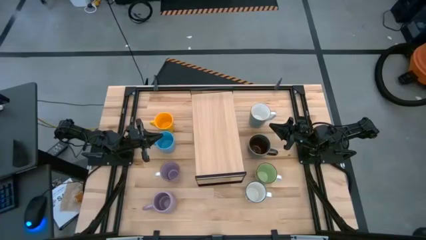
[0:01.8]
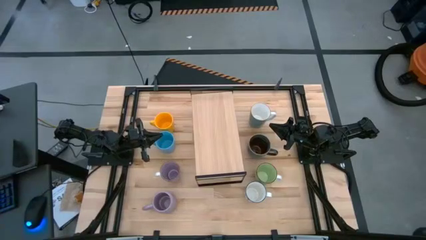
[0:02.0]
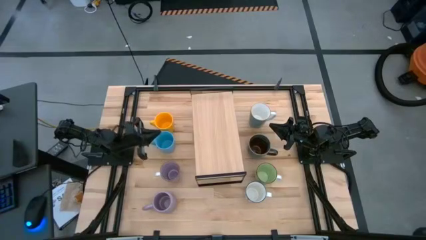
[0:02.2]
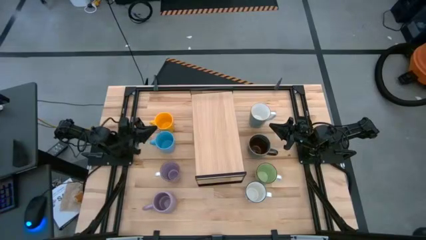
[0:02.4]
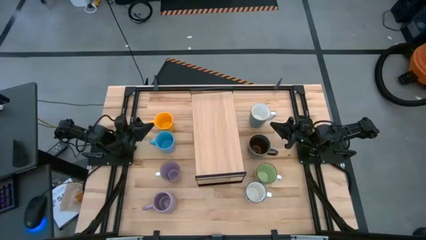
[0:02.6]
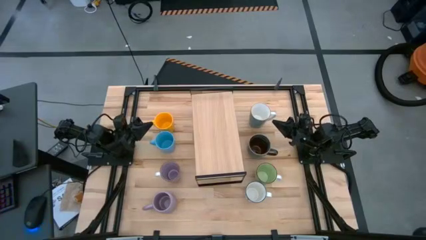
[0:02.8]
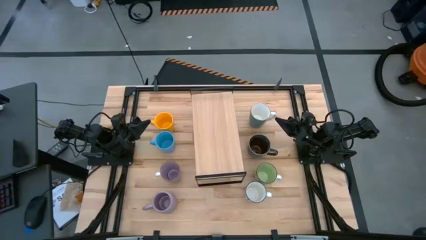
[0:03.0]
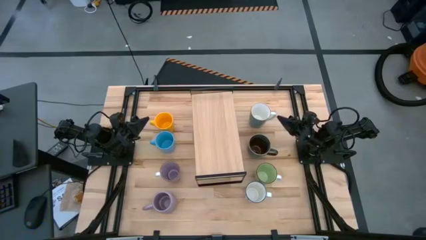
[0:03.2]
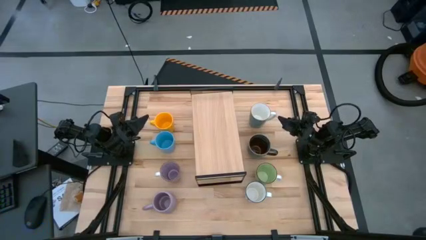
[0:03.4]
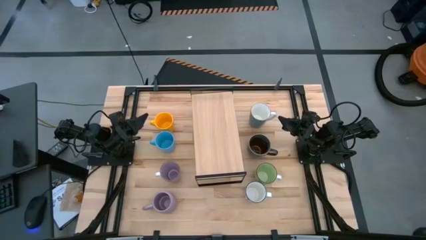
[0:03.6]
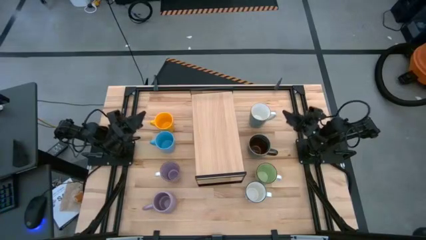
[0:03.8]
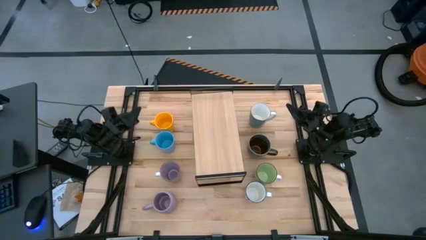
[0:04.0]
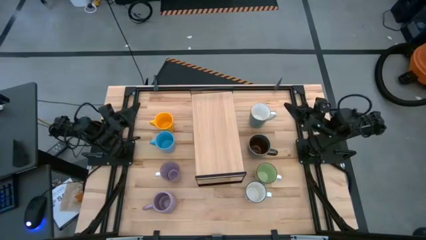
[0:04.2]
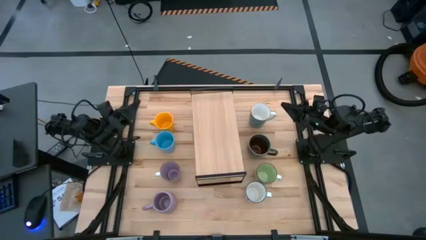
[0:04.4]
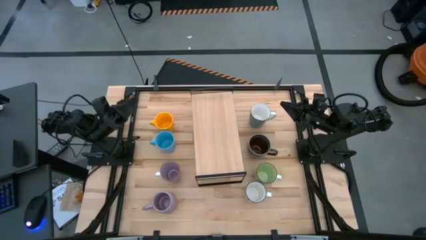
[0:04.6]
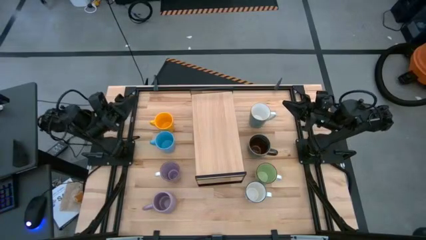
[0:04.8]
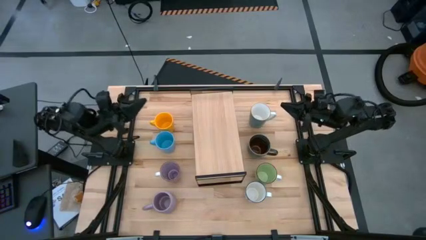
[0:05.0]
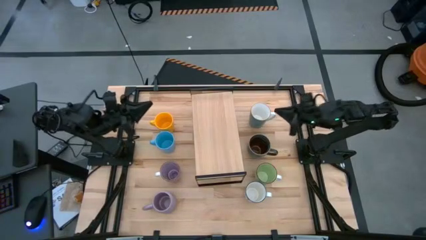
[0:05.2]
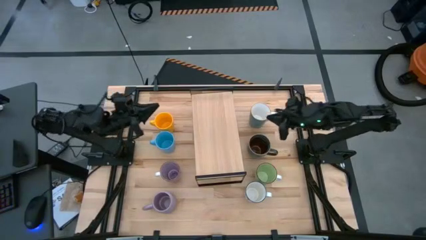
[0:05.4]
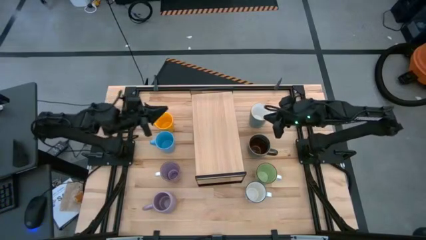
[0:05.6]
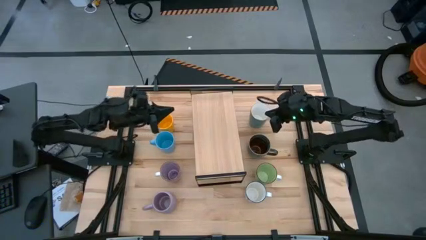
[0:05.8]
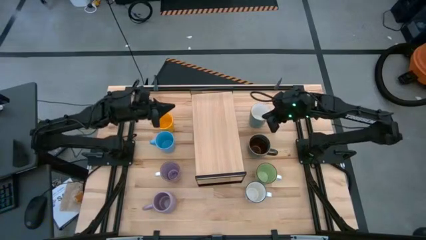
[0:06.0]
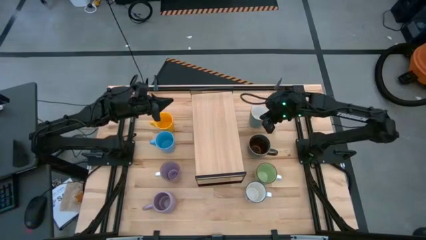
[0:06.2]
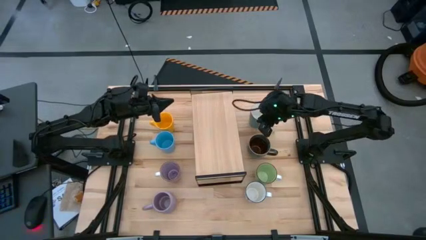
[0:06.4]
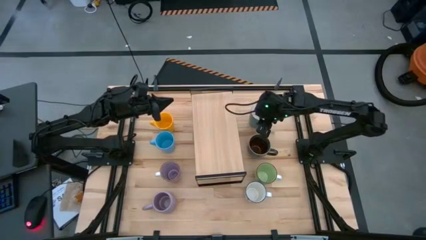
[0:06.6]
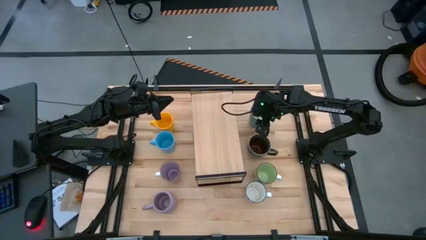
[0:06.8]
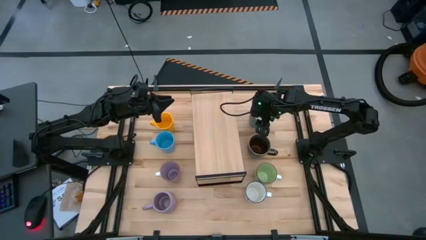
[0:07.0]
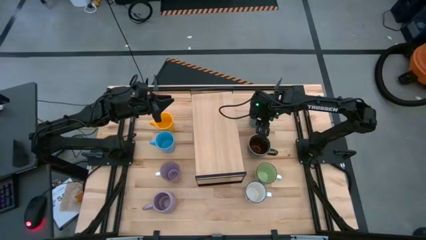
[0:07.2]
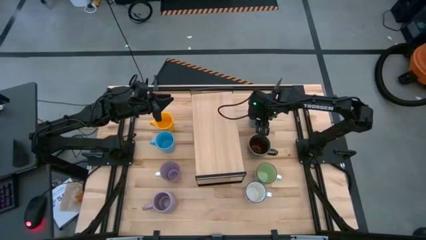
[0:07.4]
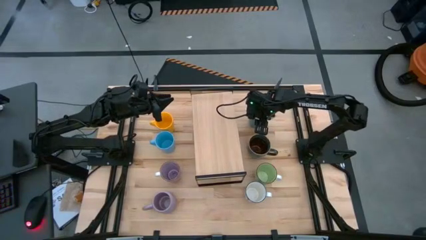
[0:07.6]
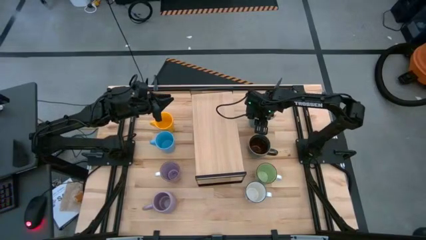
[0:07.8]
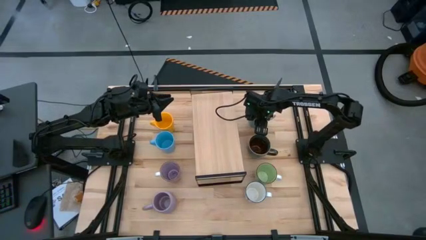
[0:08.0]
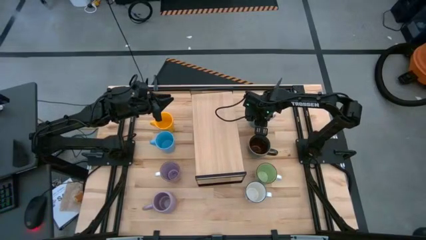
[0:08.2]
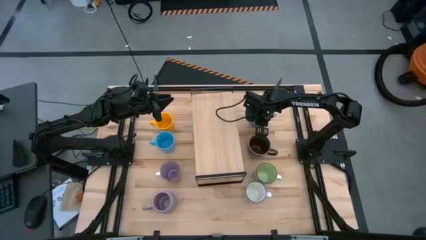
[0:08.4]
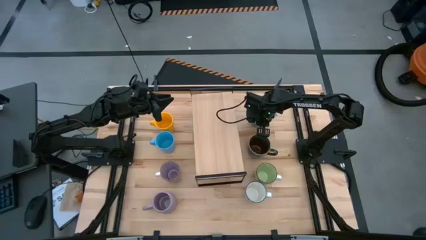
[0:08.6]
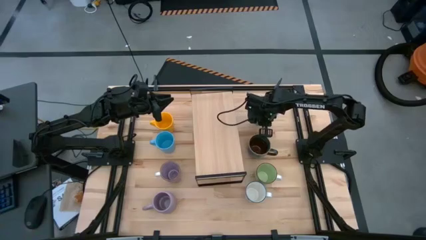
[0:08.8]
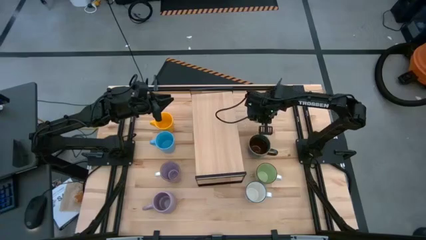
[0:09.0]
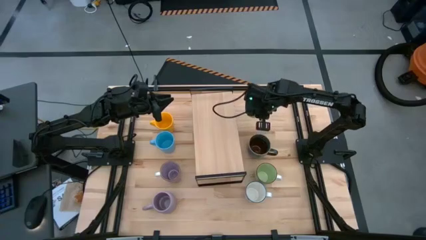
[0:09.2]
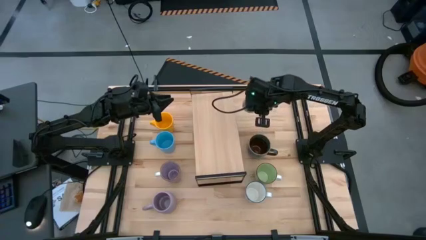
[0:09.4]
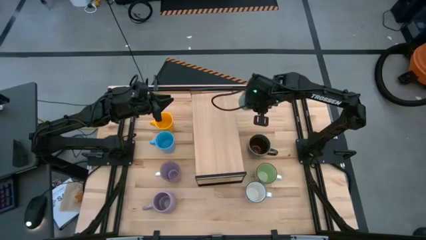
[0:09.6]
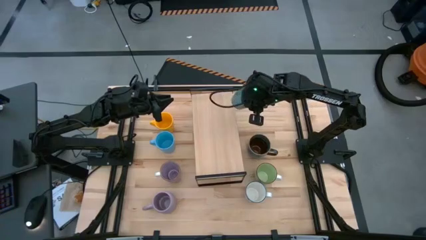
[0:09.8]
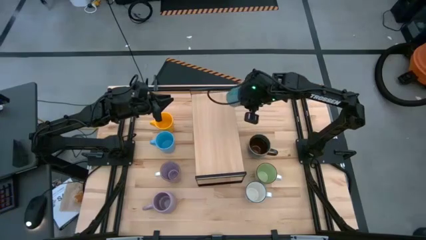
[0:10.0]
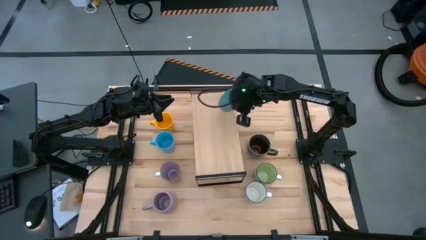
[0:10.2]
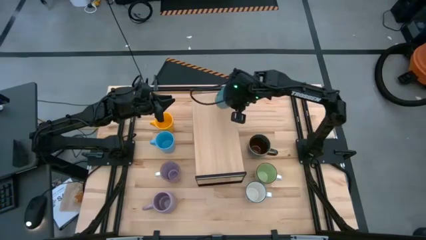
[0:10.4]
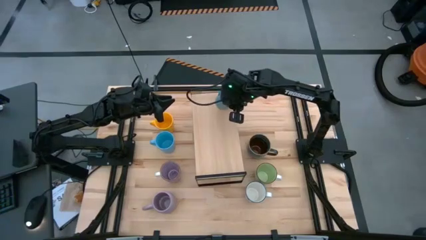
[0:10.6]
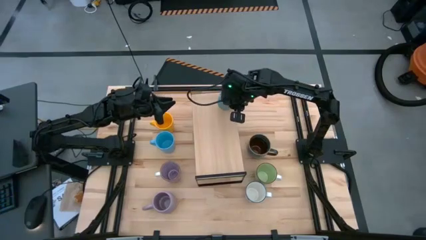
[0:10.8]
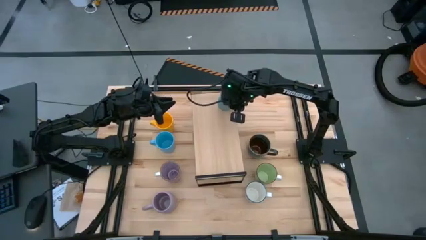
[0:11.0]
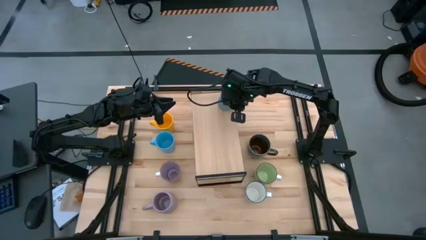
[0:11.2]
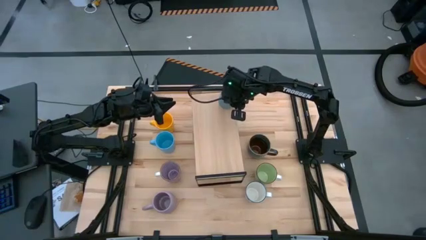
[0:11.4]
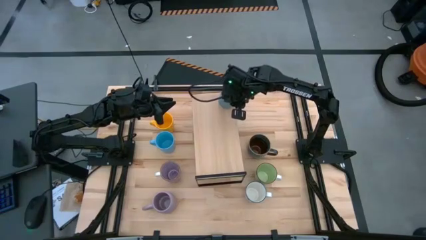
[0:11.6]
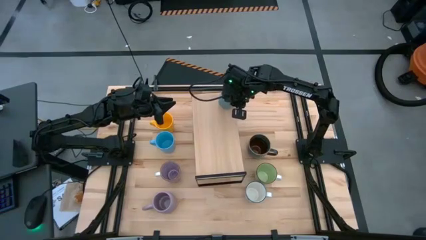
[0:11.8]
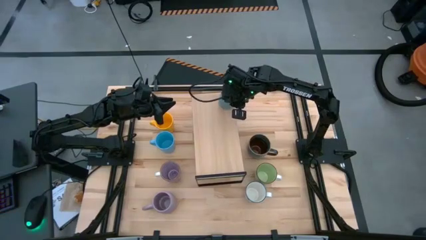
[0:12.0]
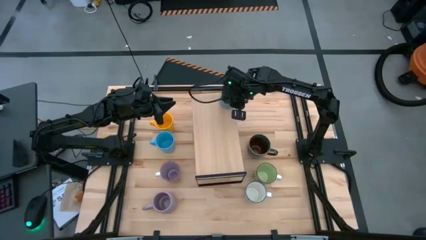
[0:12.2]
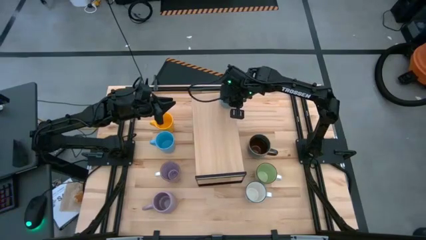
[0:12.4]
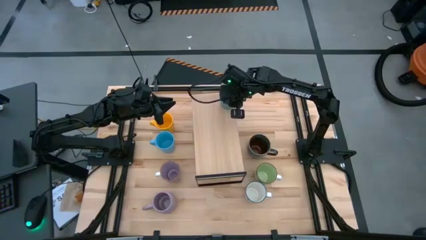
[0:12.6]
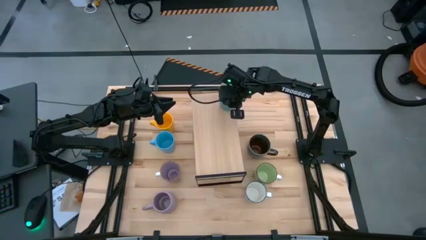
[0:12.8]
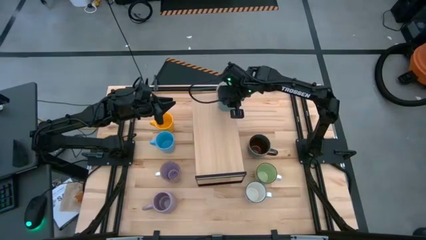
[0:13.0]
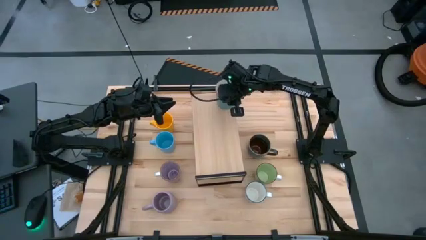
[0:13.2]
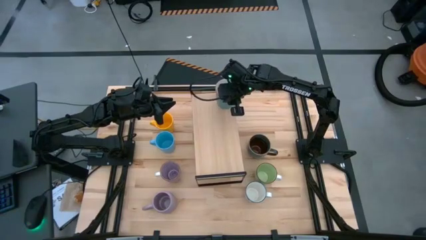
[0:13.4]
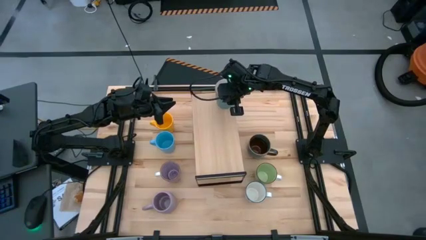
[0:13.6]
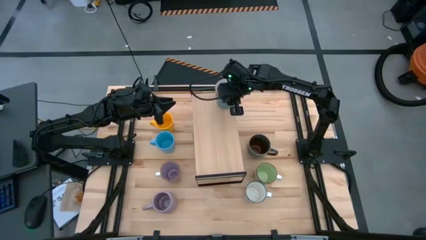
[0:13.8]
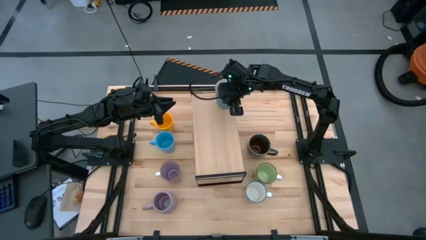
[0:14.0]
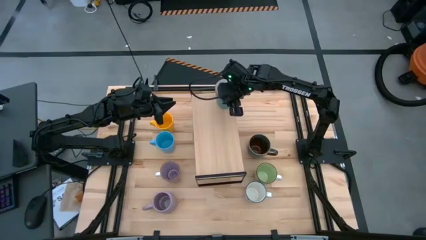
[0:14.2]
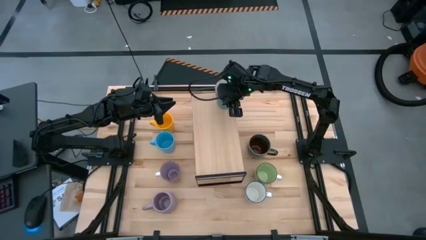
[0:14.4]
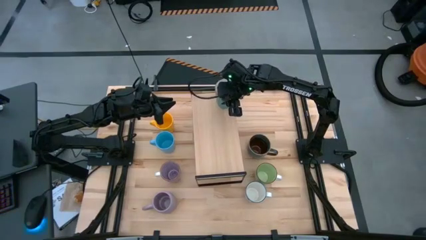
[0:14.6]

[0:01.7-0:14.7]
Task: Place coffee mugs
Put the light blue mug on the shelf
